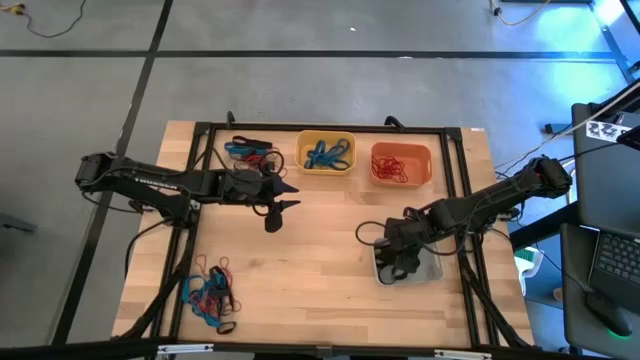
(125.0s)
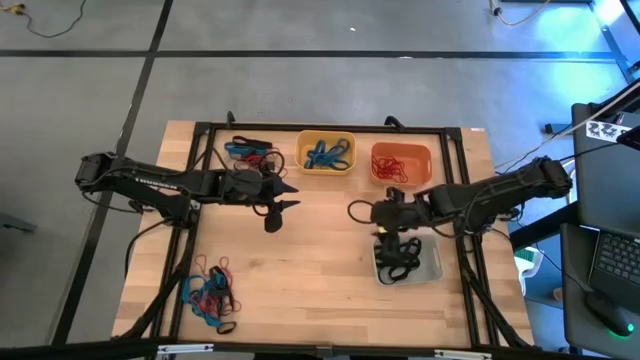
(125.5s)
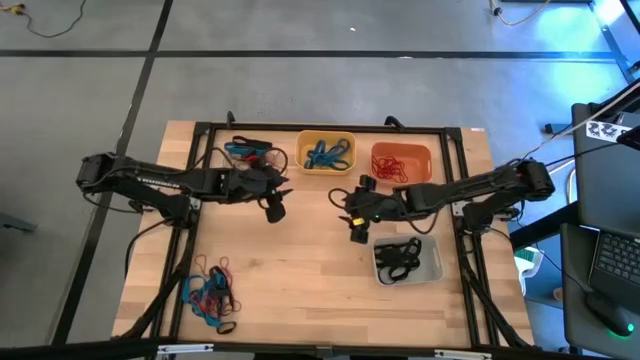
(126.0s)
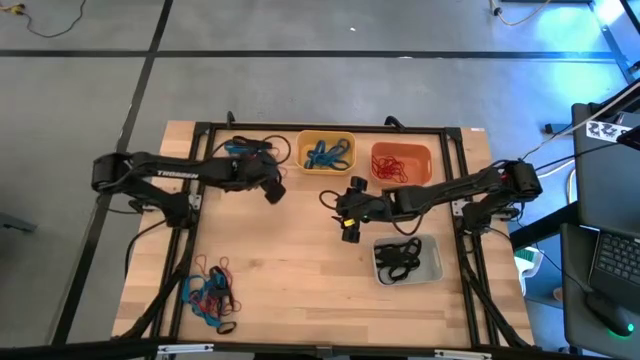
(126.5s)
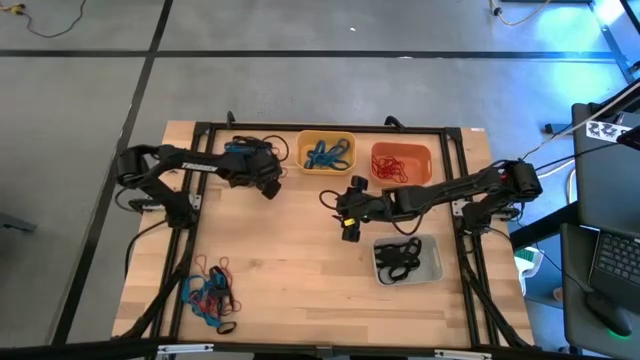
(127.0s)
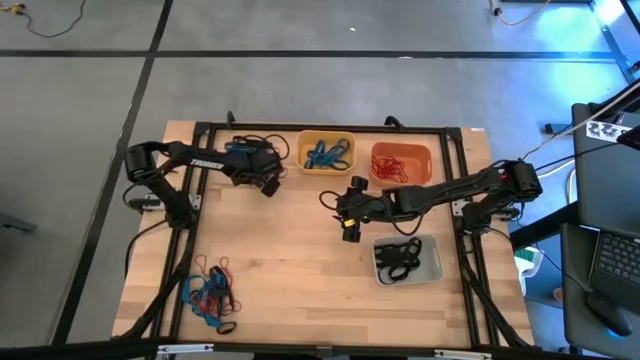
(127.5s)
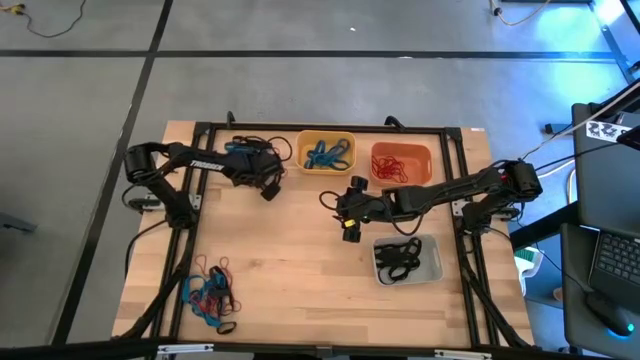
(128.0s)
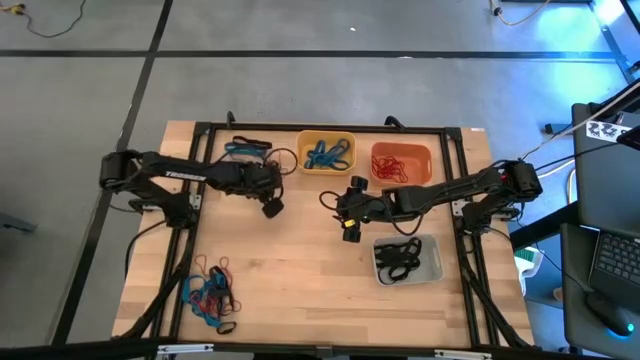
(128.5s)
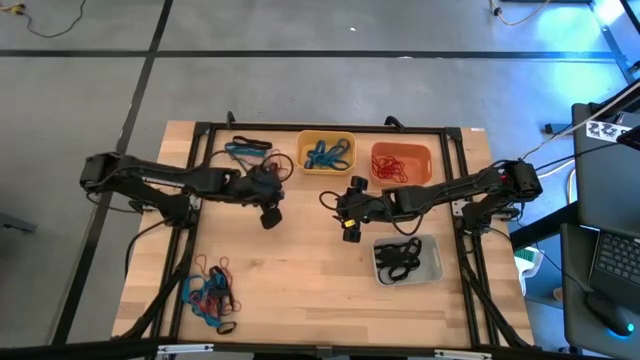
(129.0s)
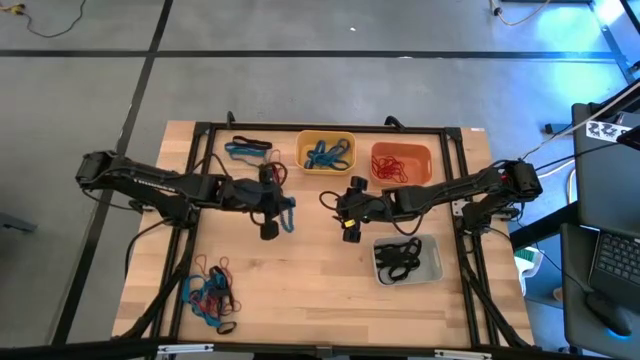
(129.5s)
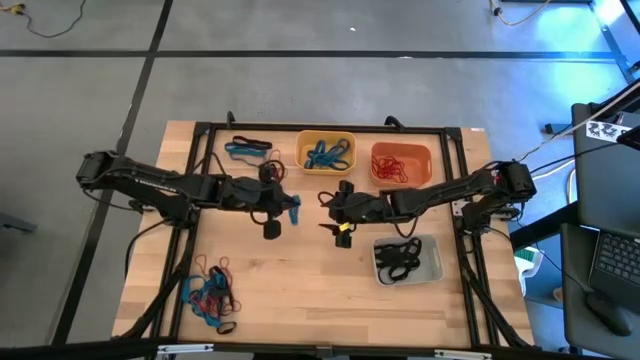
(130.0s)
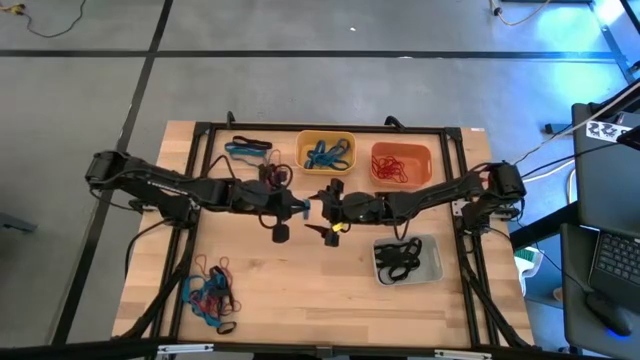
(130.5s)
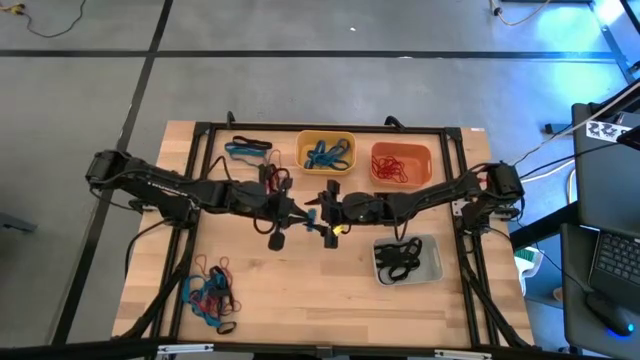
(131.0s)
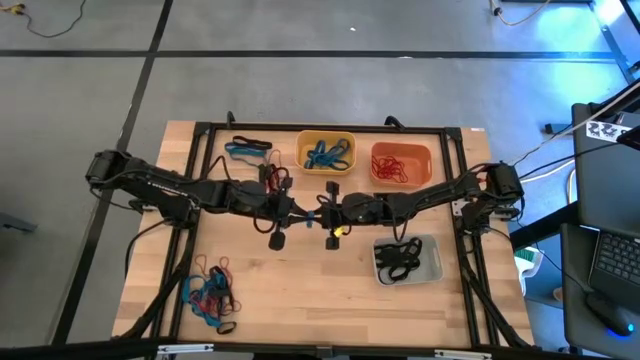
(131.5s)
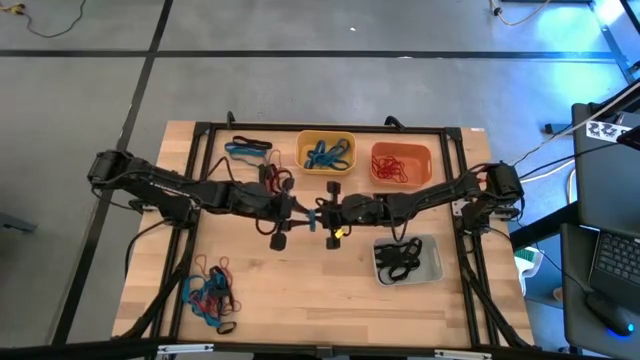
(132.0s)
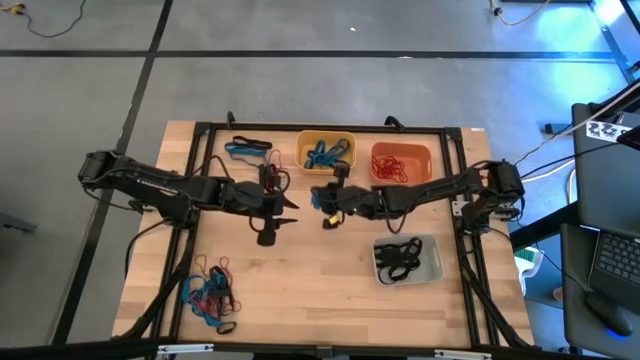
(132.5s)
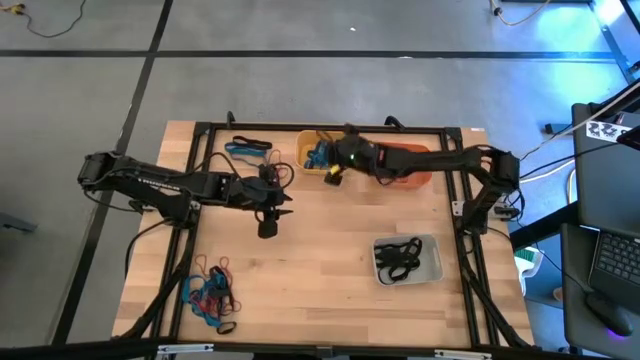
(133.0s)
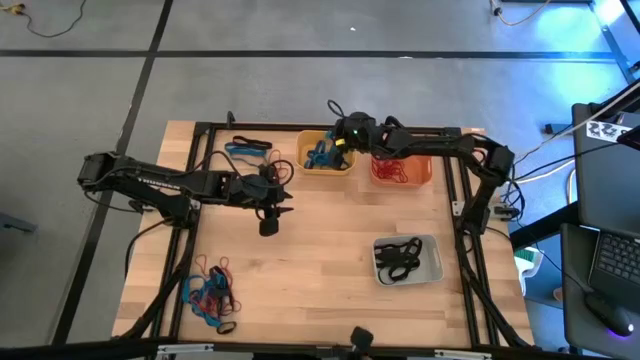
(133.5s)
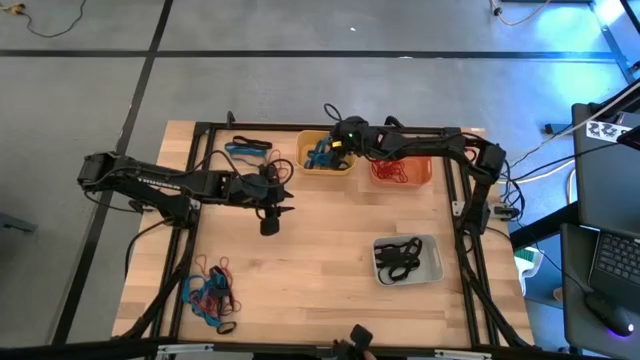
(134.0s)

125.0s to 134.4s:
Task: Sort rubber bands into baskets
Put the blue rubber band into the yellow bin

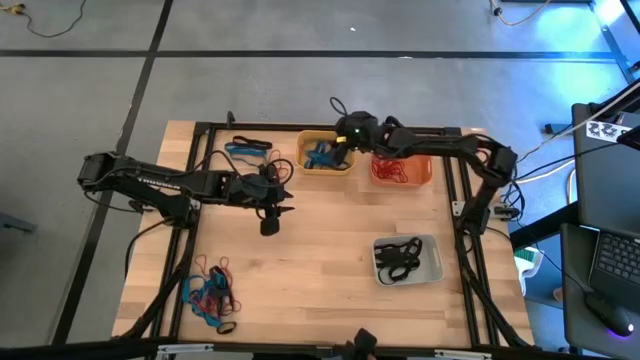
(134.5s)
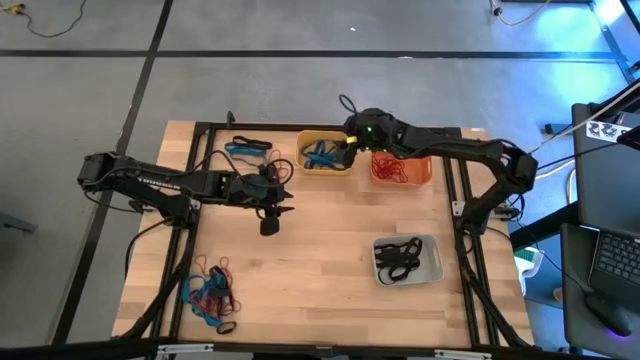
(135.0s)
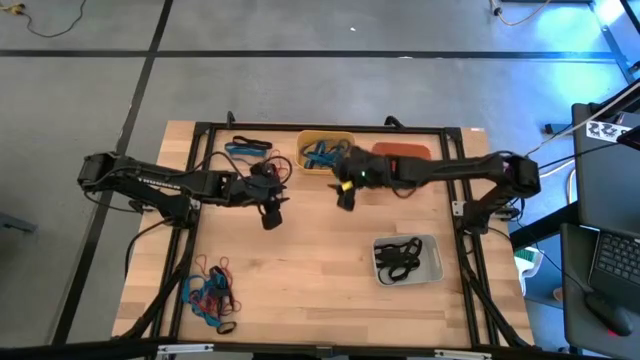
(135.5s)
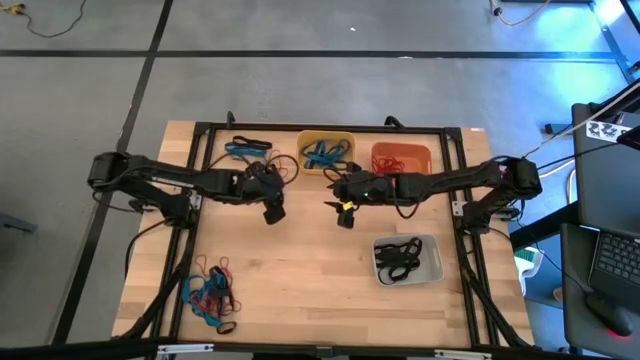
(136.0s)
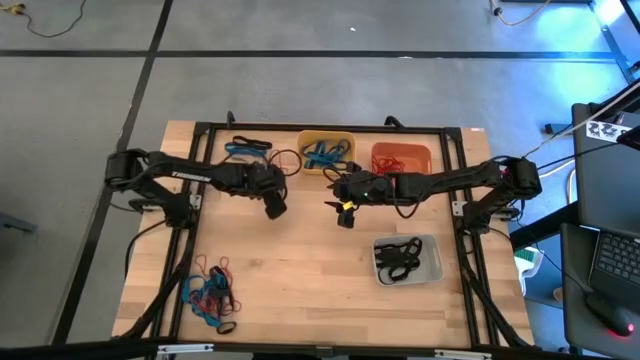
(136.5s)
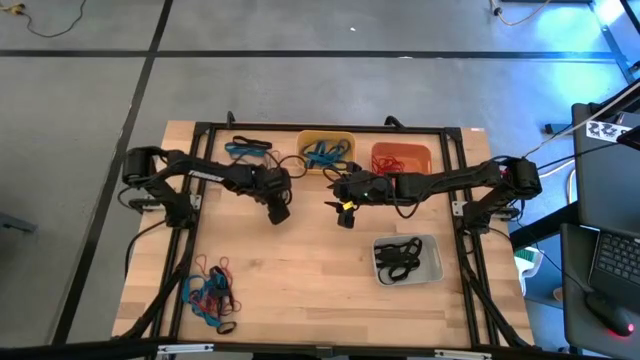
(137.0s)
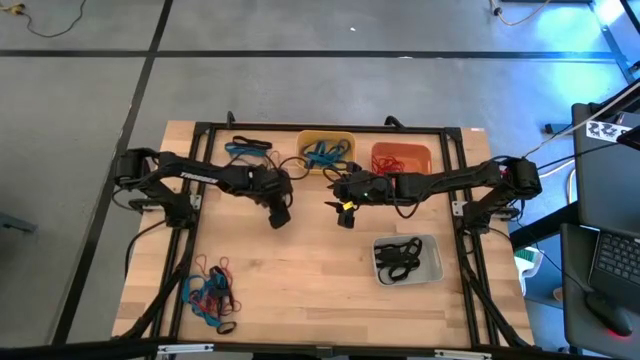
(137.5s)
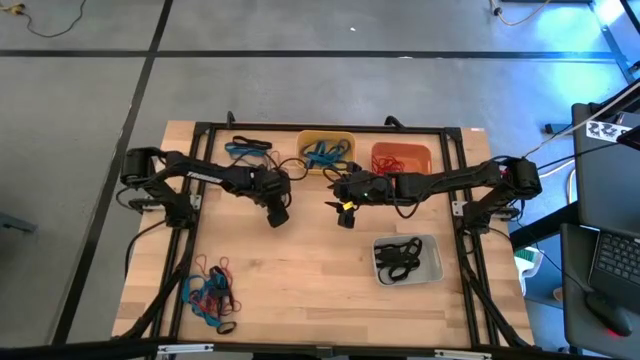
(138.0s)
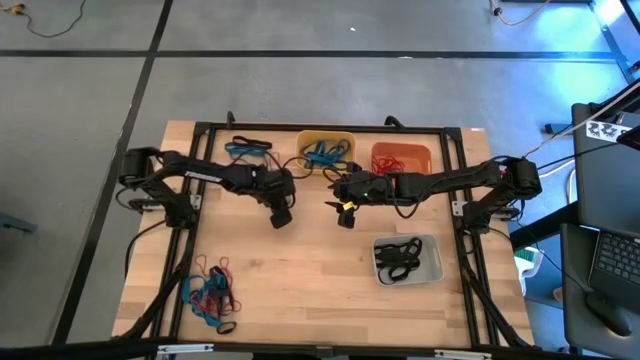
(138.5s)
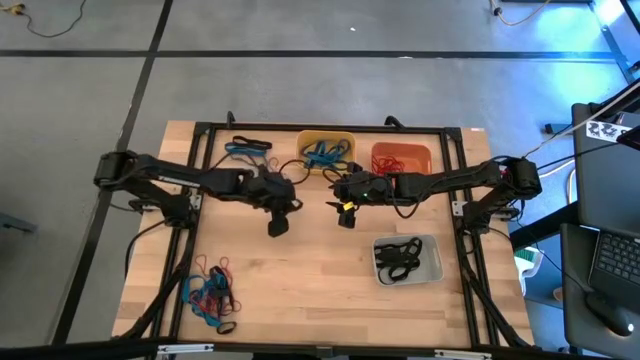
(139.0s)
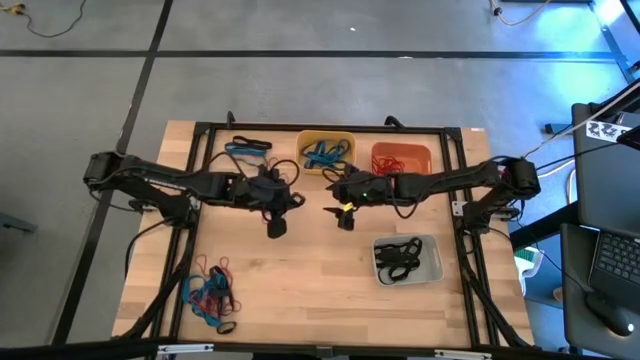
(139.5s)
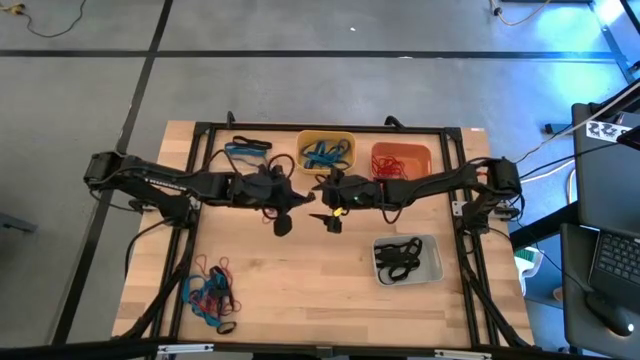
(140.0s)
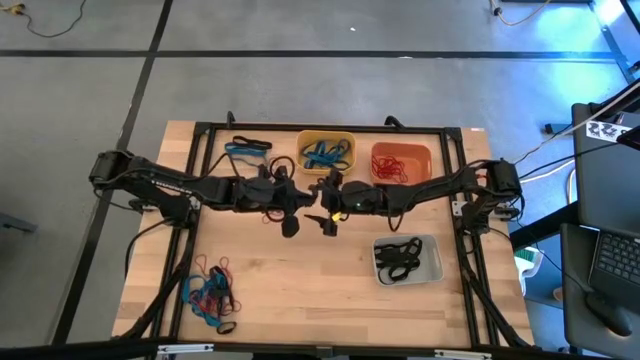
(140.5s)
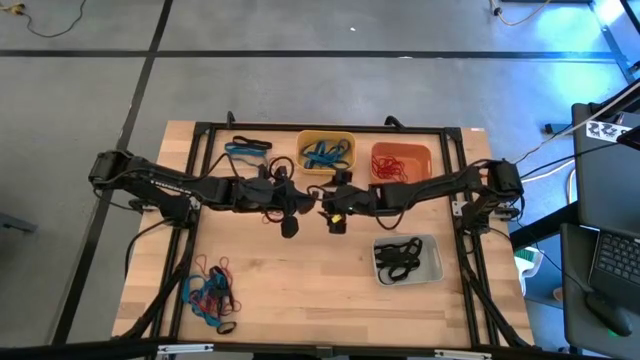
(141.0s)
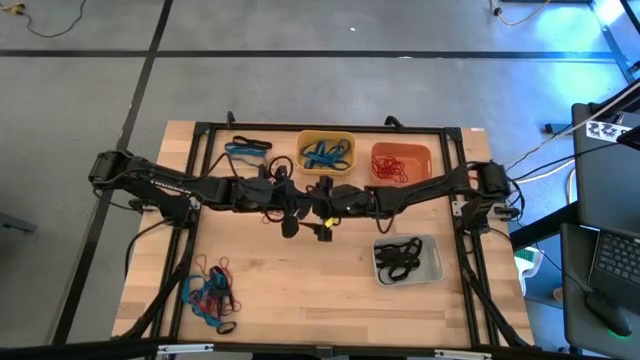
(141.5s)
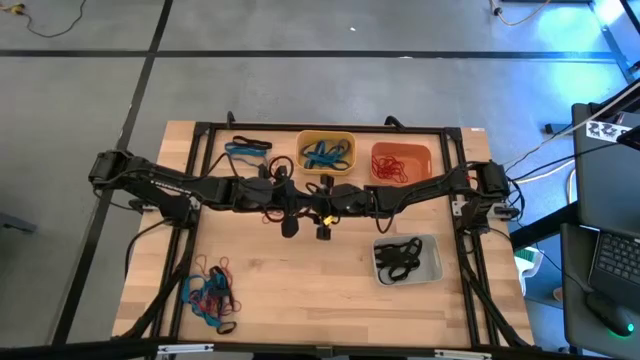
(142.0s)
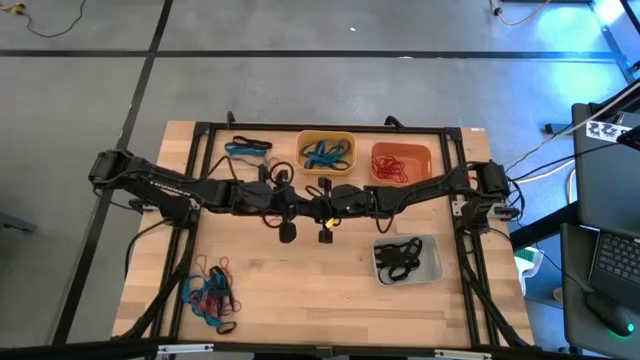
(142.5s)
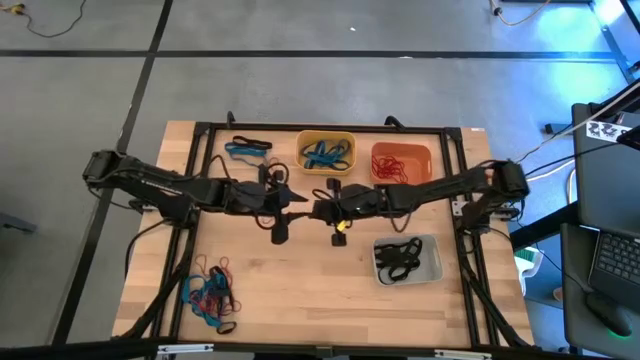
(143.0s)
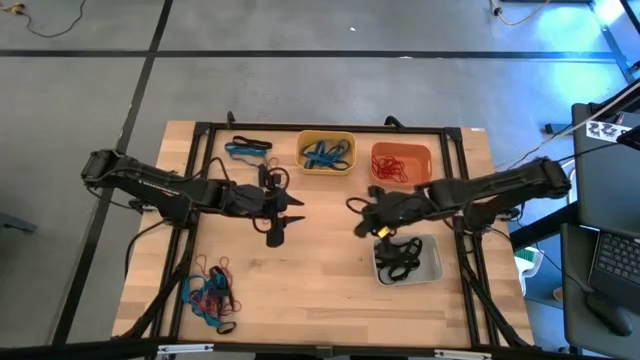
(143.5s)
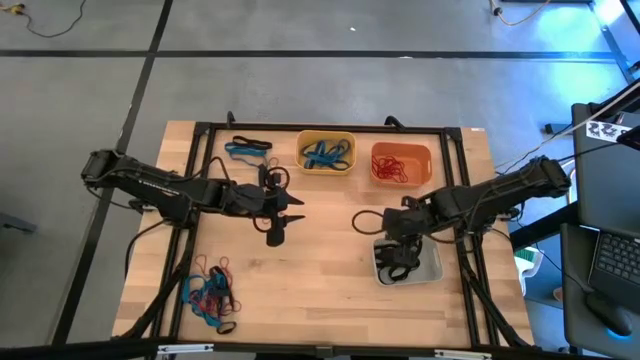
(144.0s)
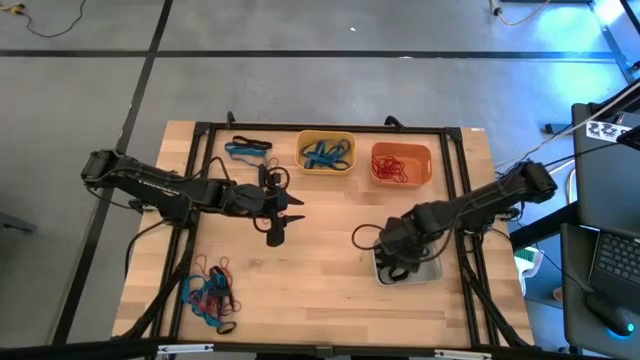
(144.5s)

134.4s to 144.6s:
Put the black rubber band into the white bin

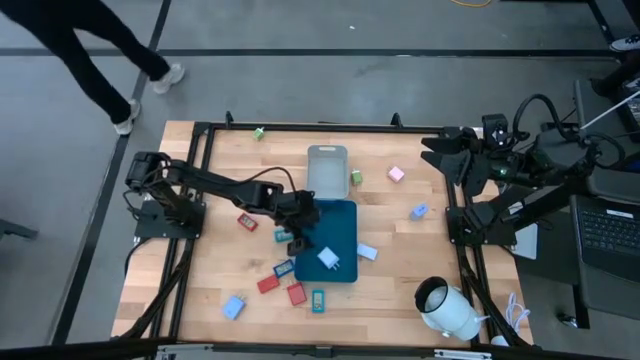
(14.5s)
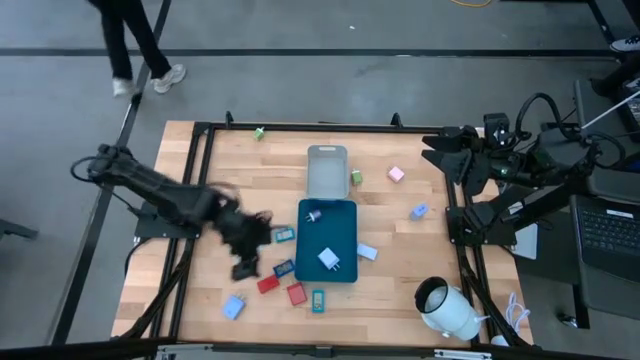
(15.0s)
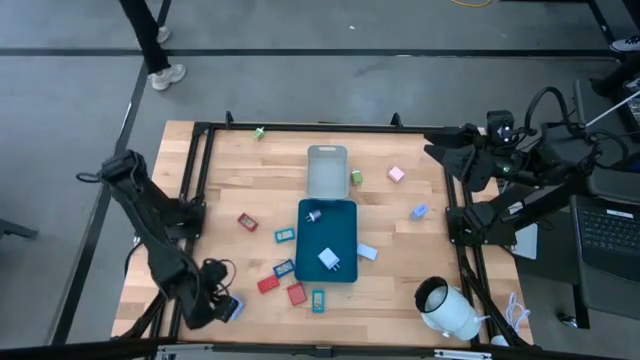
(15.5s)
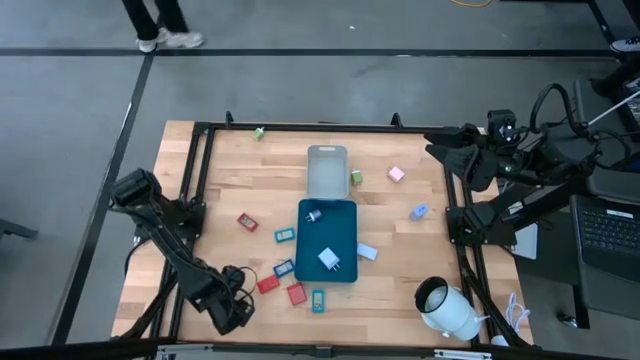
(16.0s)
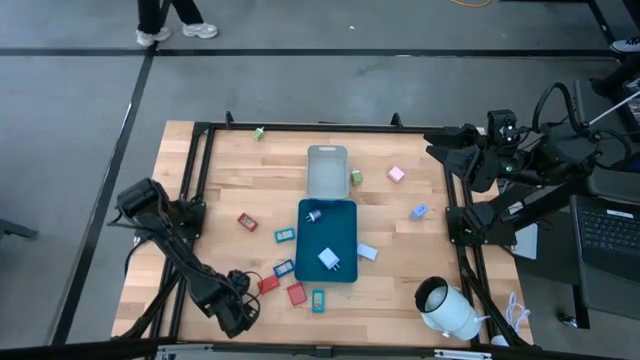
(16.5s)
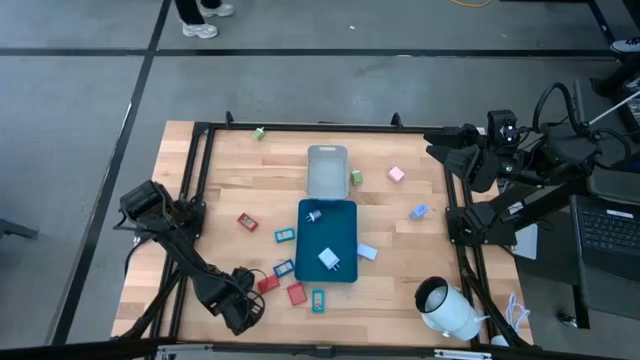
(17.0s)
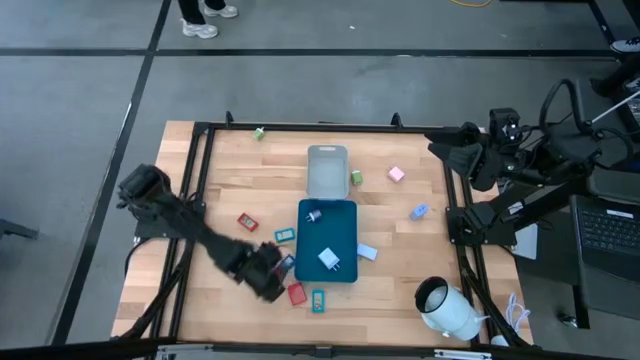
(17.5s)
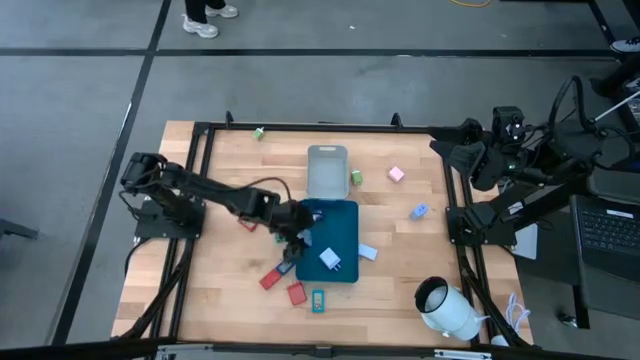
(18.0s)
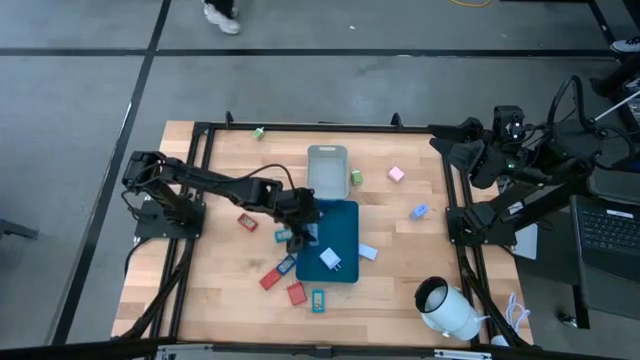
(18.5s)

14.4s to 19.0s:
Task: Pick & Place Office items
Put the light blue charger adapter into the blue bin
